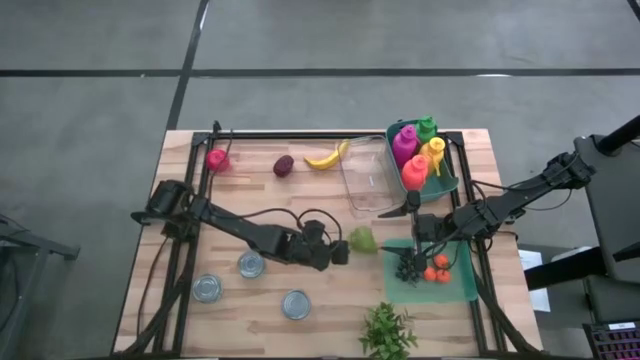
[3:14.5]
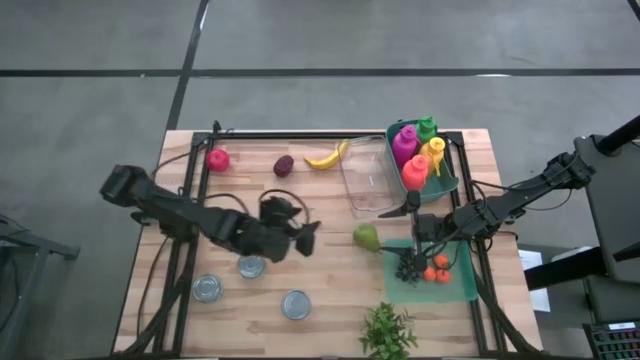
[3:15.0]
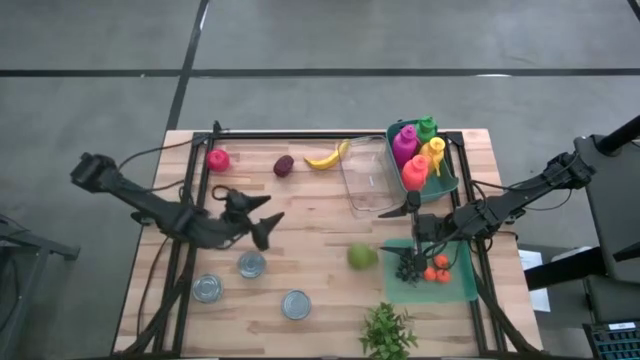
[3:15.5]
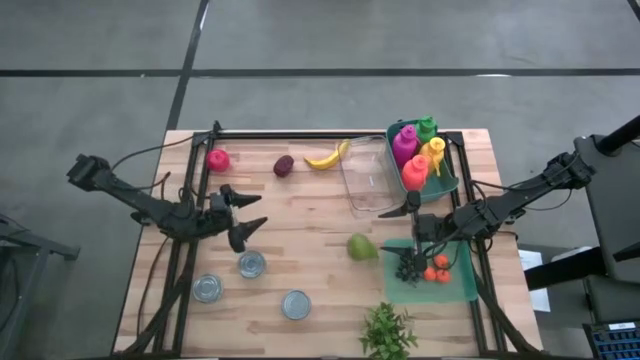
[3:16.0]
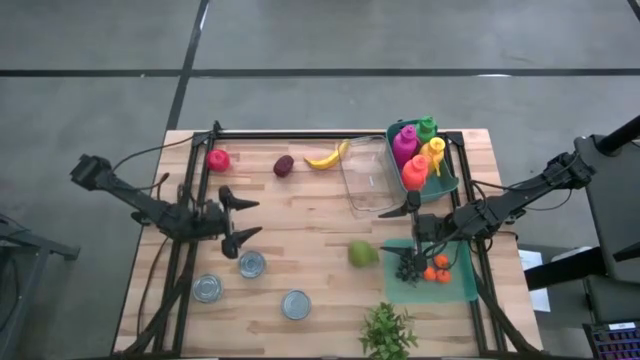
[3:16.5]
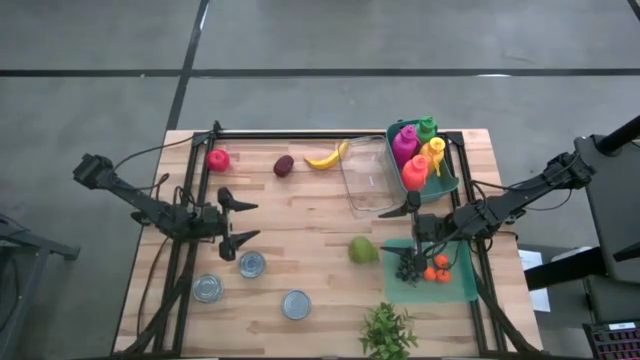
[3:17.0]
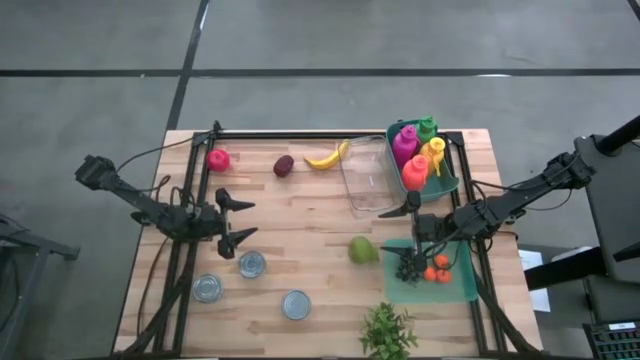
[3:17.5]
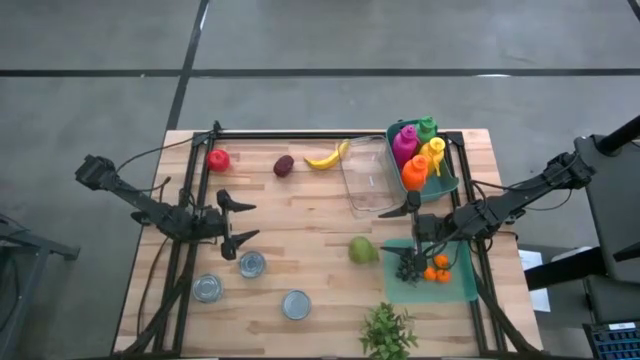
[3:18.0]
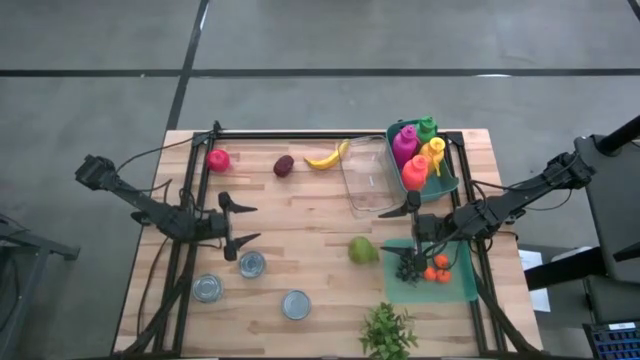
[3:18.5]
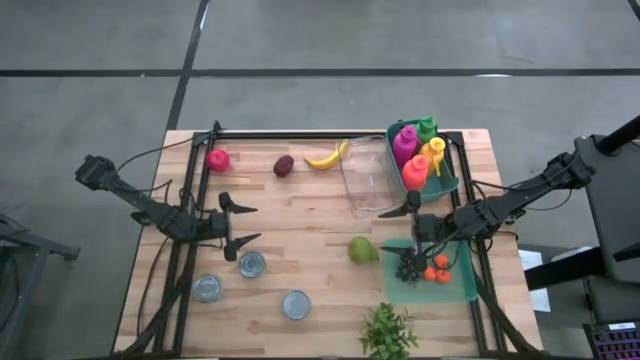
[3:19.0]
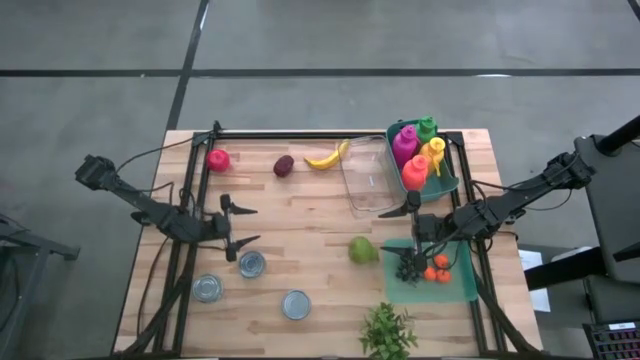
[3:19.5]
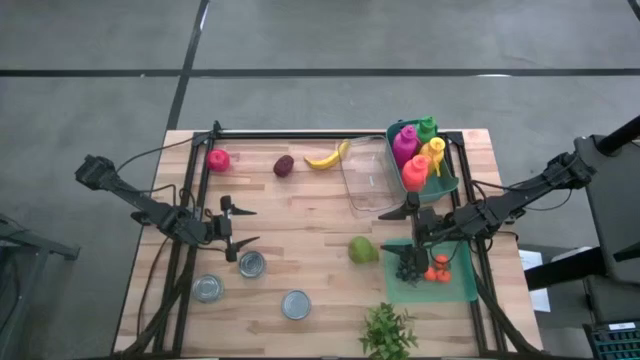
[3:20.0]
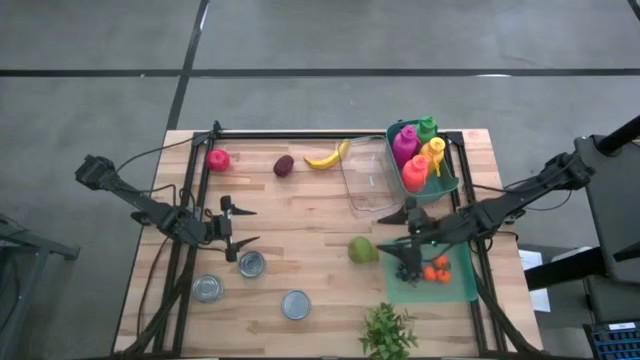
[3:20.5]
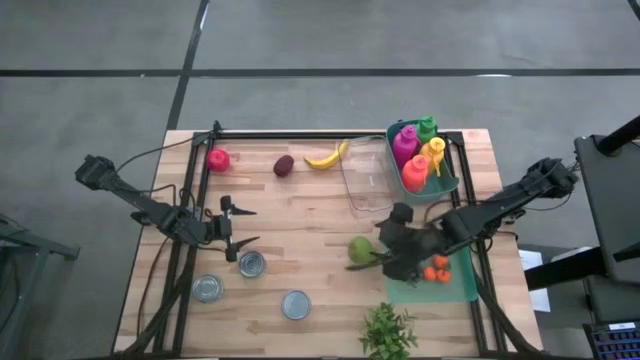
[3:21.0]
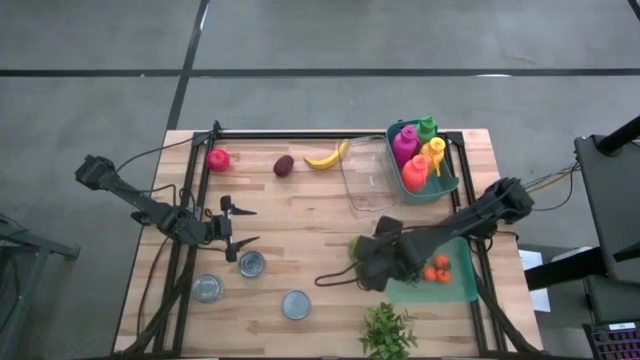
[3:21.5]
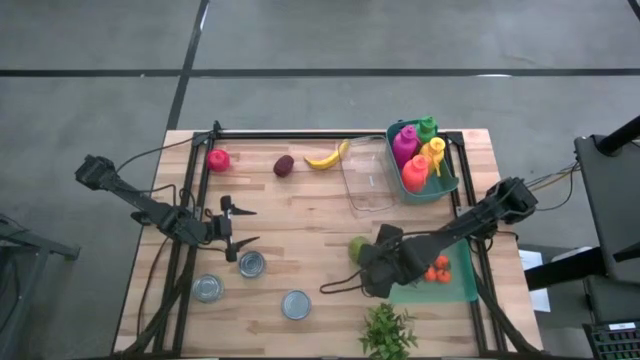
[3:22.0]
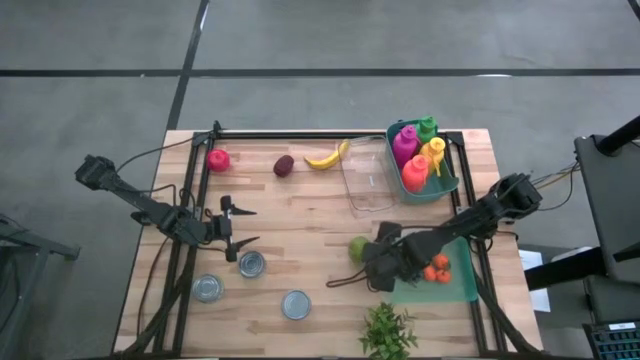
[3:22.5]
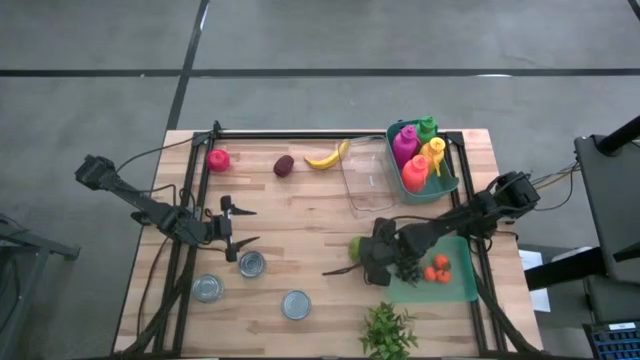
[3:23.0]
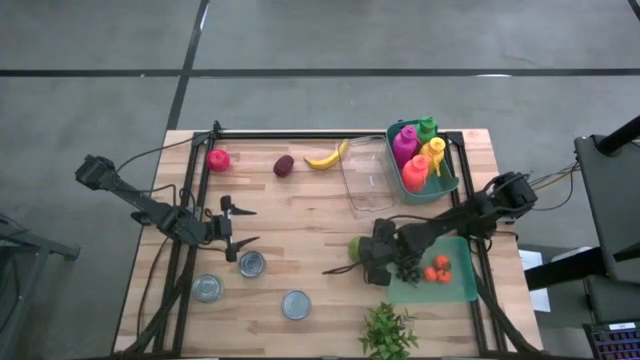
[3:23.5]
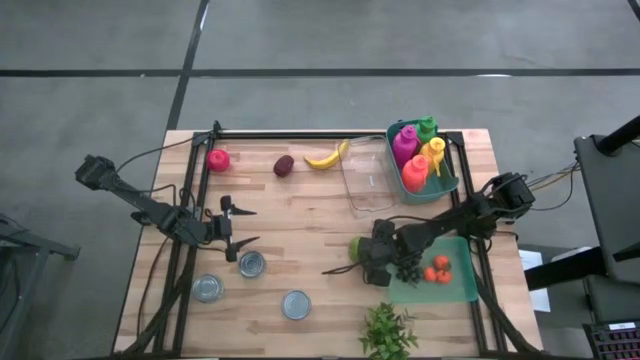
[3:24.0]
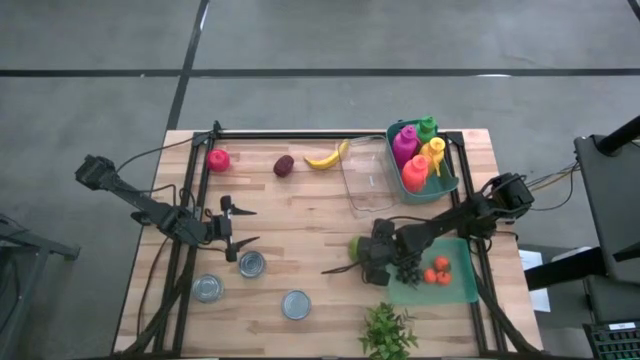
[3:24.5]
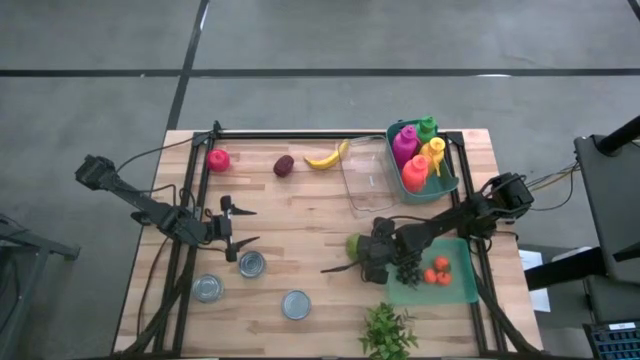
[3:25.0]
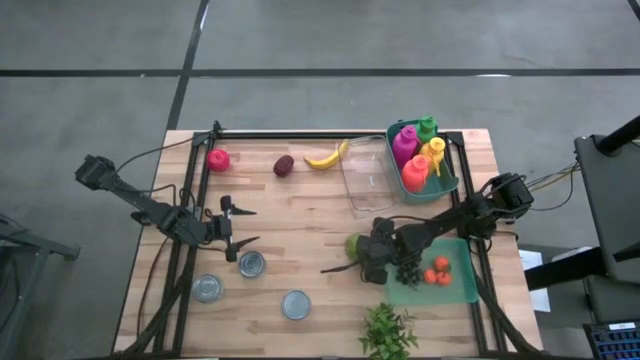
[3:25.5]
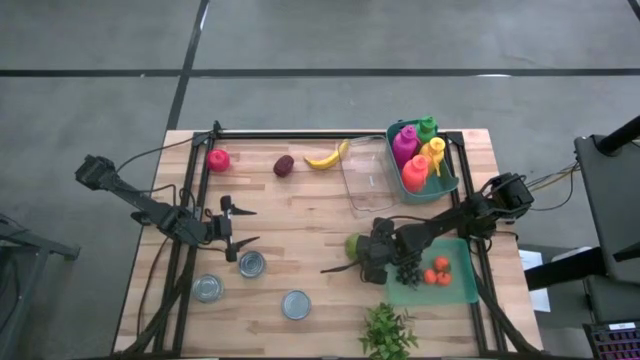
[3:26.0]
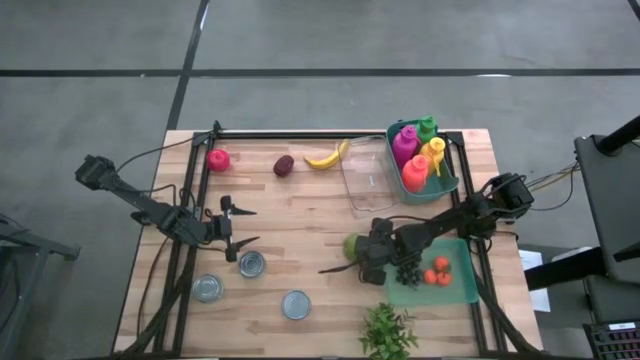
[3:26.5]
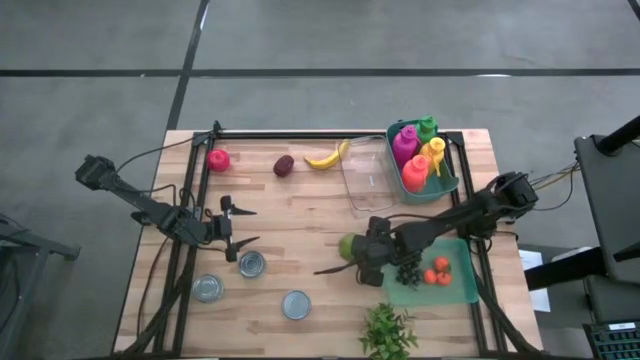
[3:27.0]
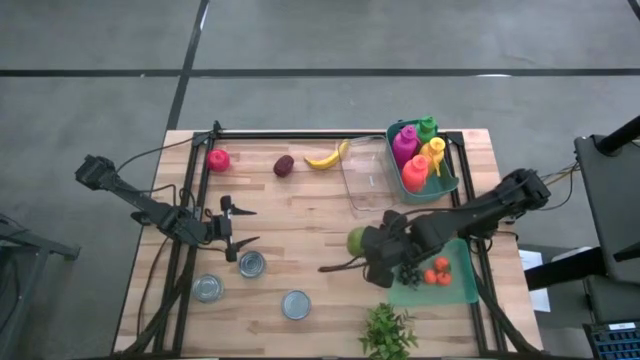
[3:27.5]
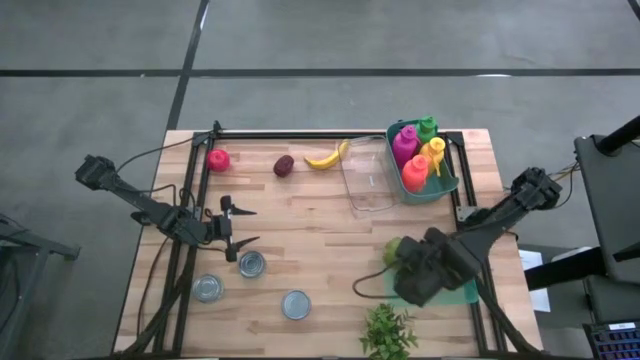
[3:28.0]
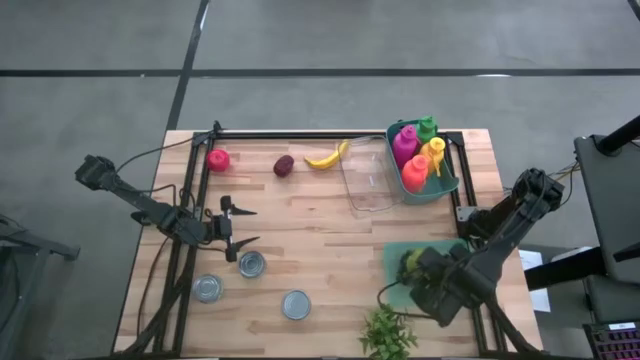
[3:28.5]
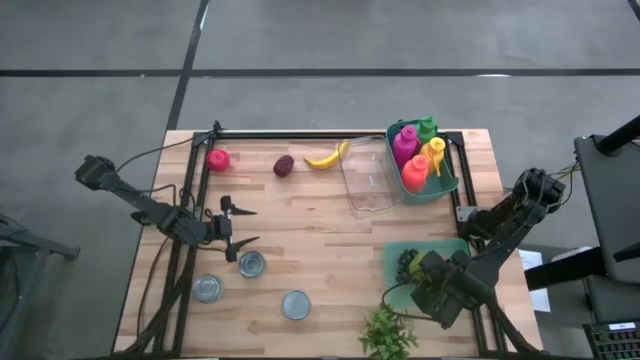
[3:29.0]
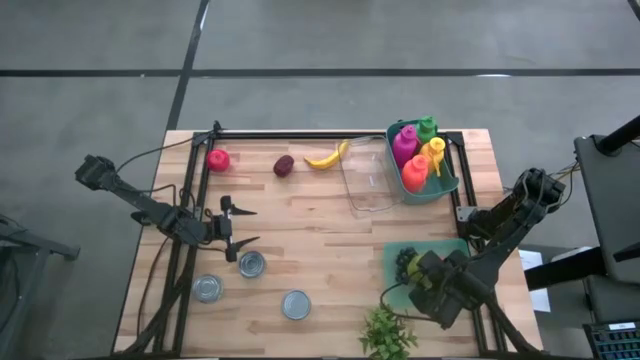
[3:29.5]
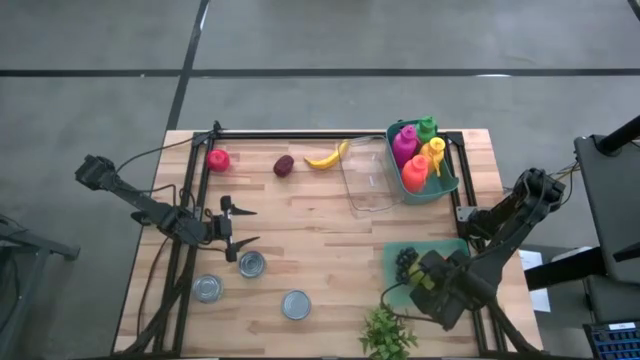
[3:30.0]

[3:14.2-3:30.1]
Task: Pick & Place Food Item
Put the pear into the green transparent bin

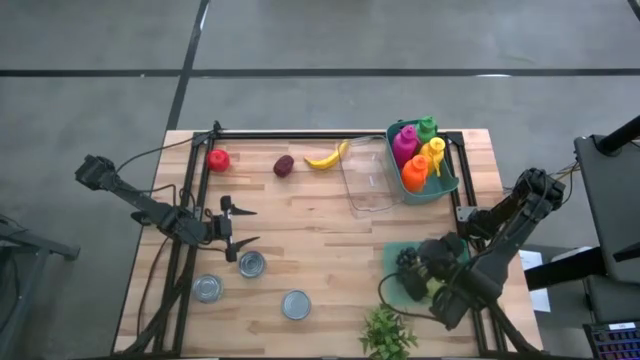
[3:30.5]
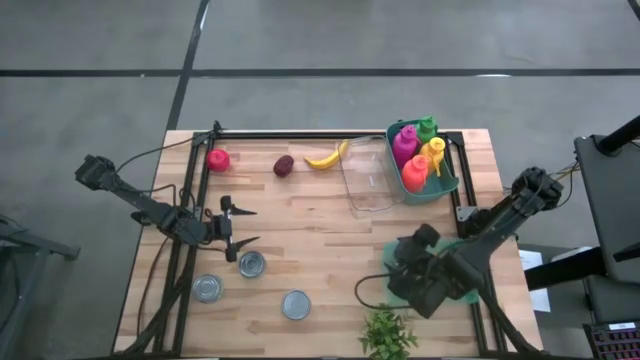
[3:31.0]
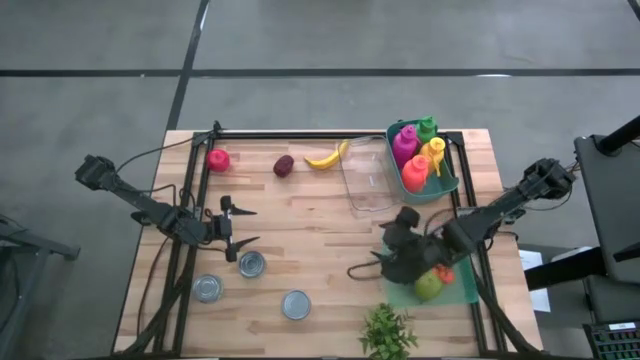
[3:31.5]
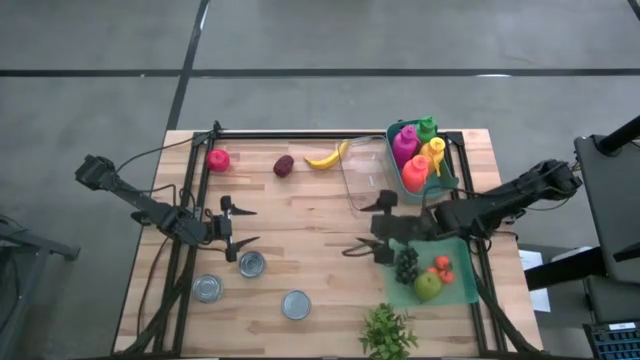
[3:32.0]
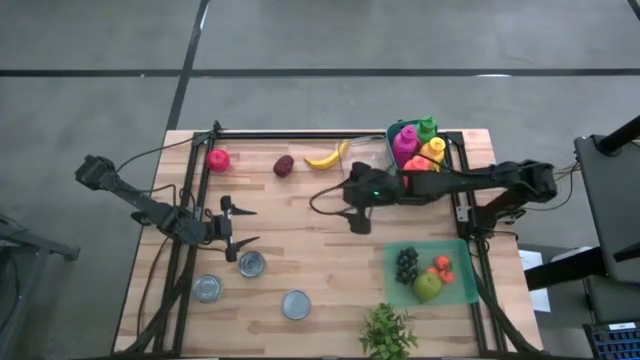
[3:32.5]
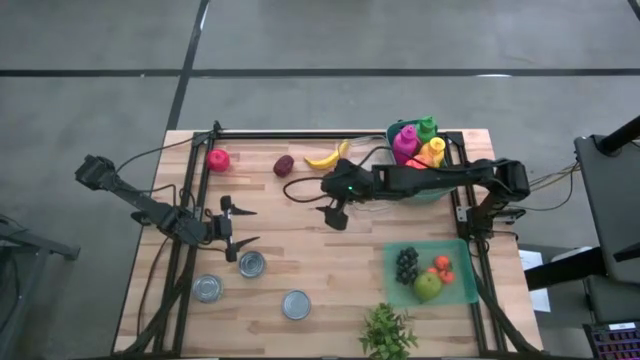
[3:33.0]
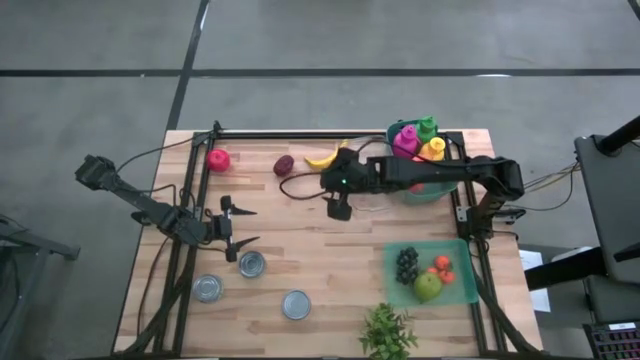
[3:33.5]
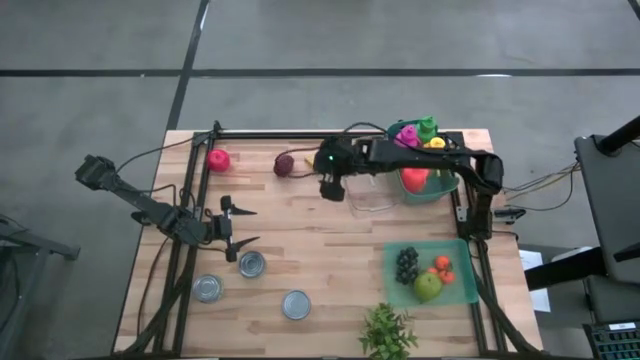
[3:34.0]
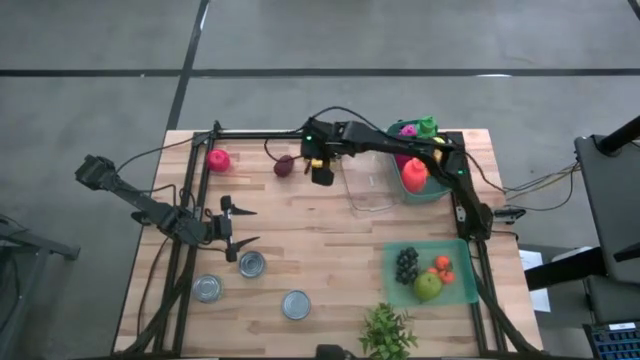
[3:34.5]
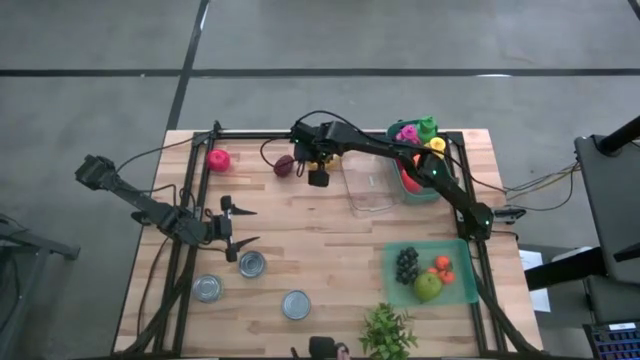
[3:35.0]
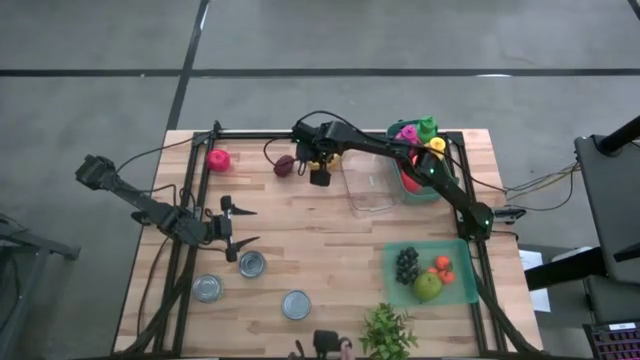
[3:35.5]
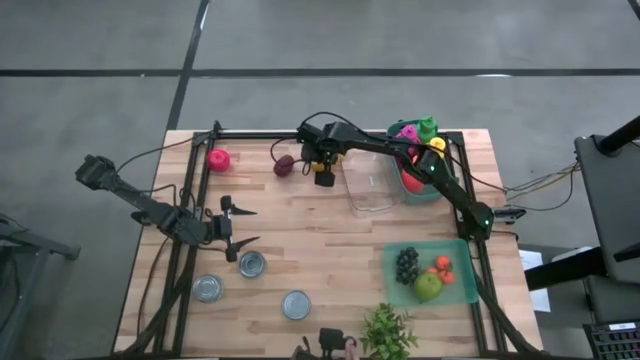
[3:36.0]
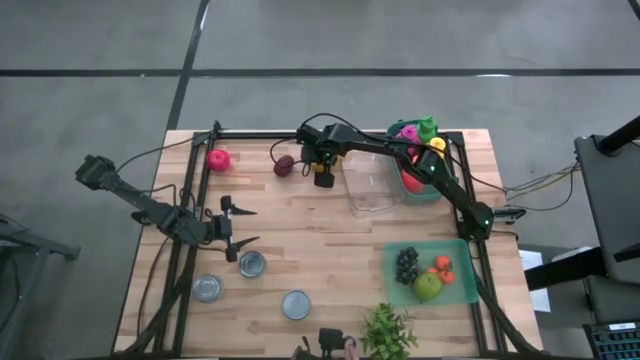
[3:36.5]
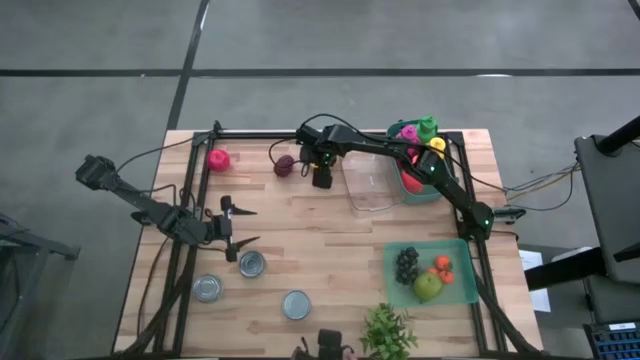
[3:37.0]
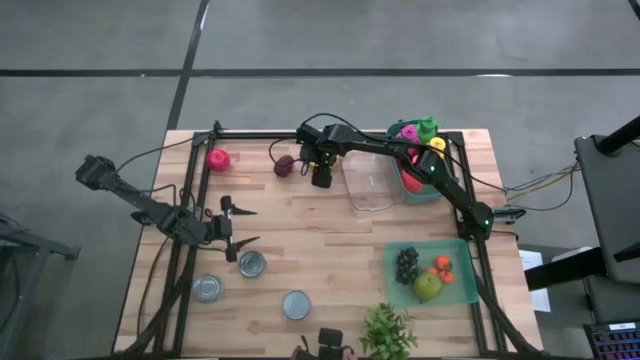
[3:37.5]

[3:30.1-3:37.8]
Put the banana into the green transparent bin
